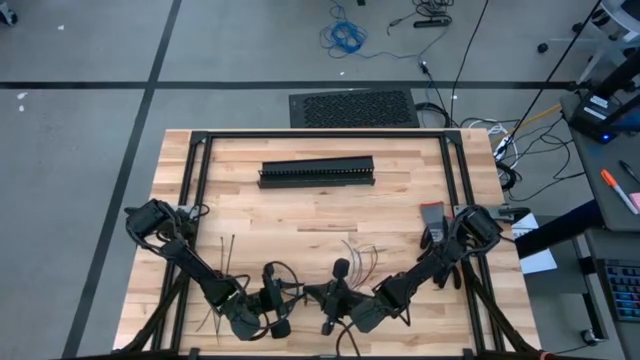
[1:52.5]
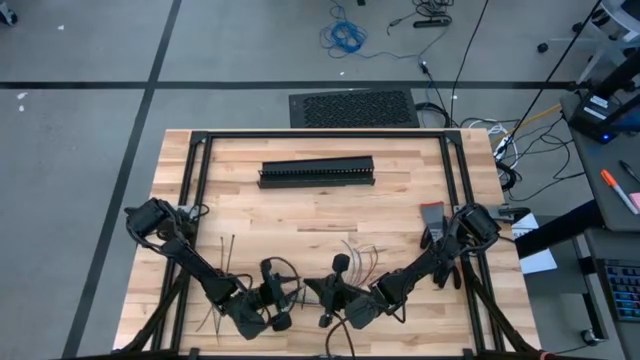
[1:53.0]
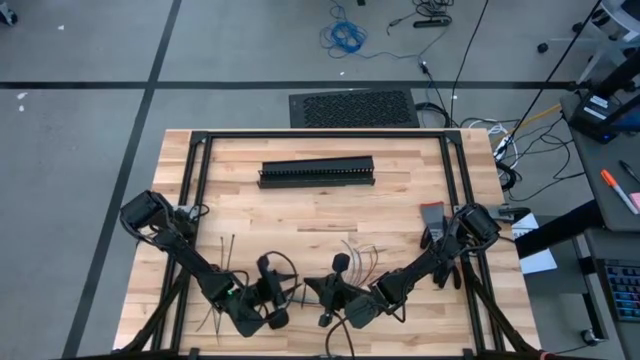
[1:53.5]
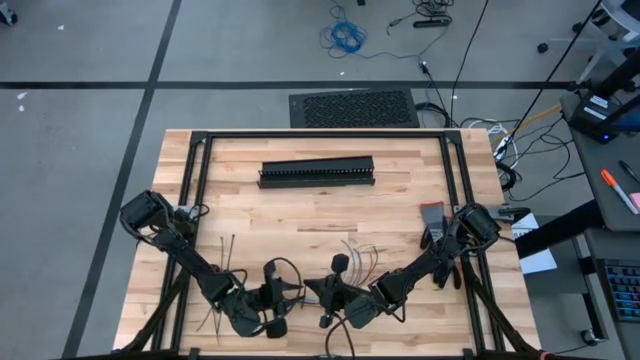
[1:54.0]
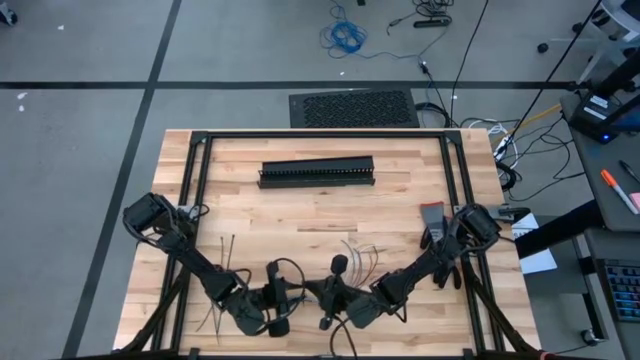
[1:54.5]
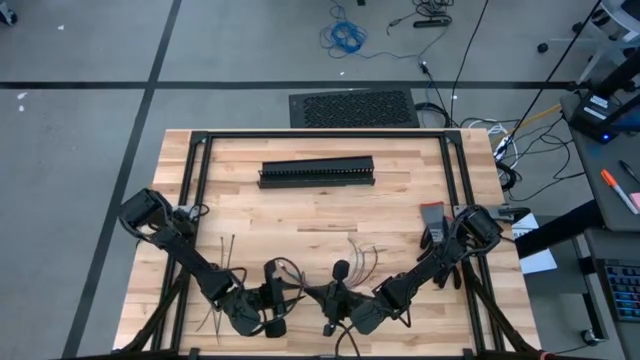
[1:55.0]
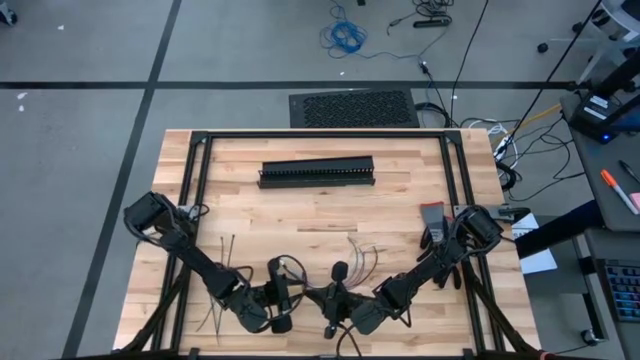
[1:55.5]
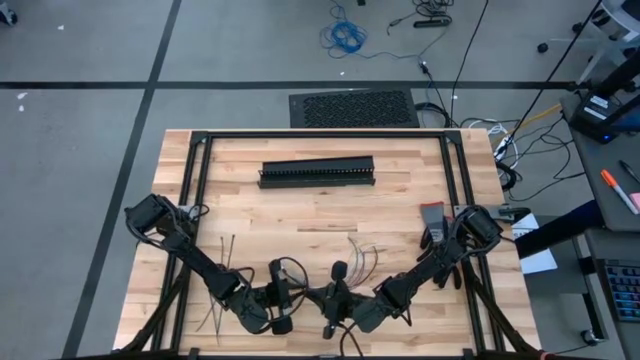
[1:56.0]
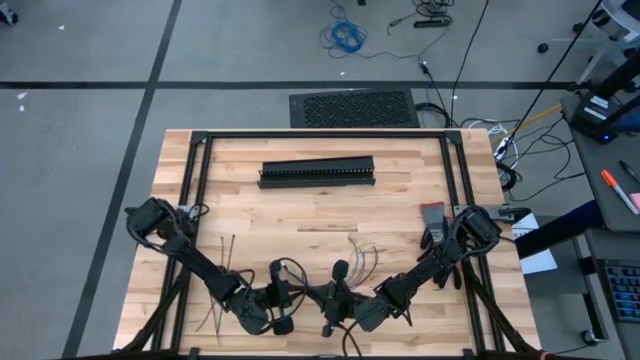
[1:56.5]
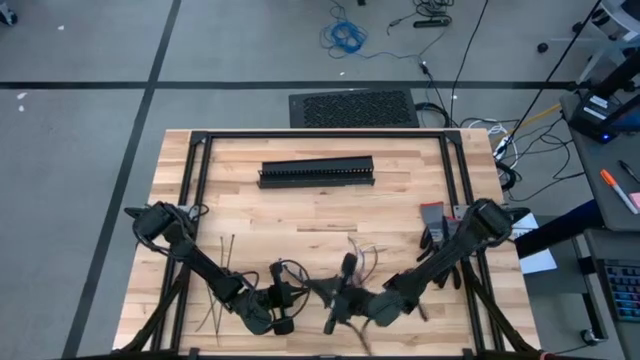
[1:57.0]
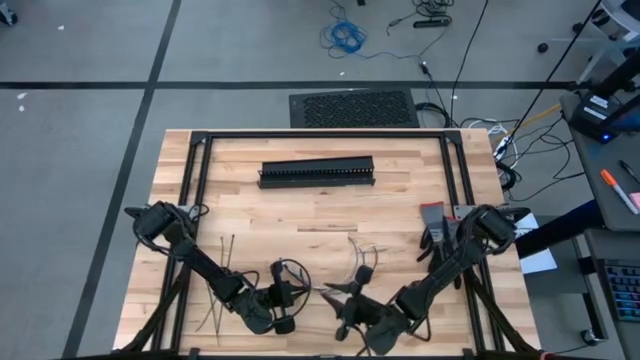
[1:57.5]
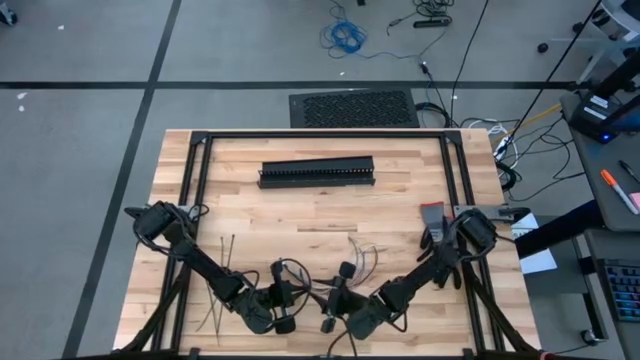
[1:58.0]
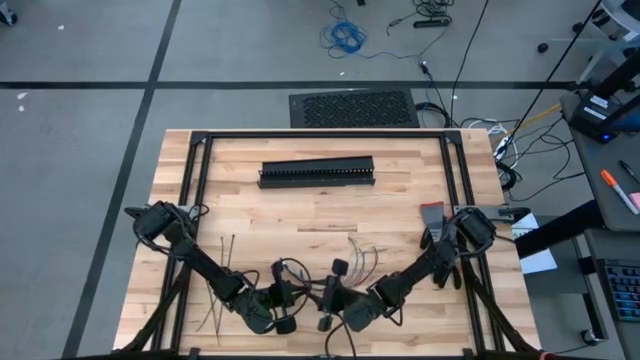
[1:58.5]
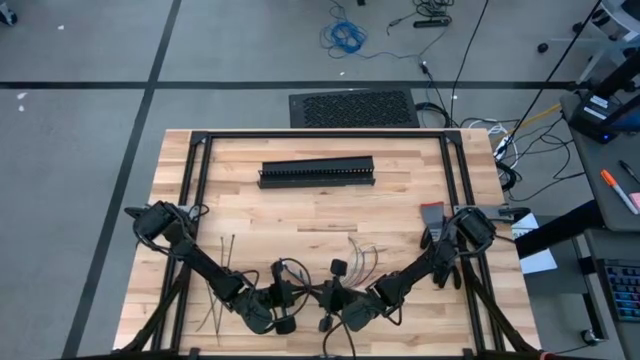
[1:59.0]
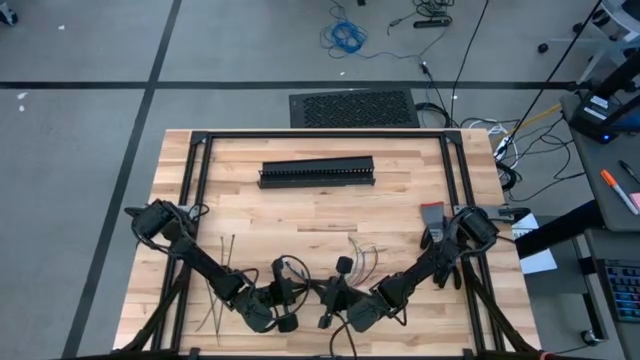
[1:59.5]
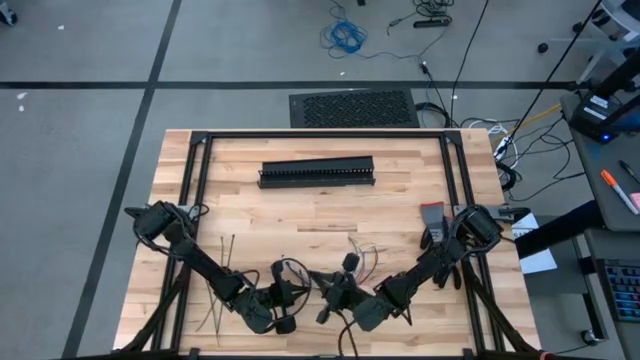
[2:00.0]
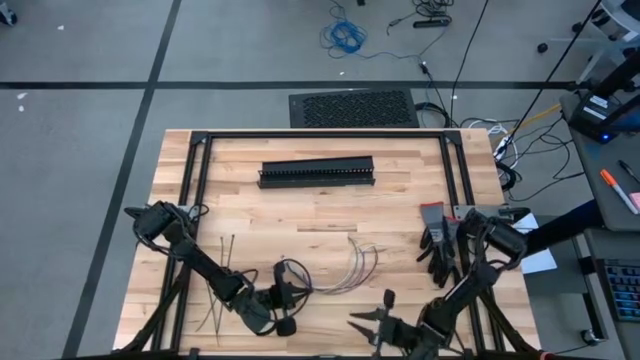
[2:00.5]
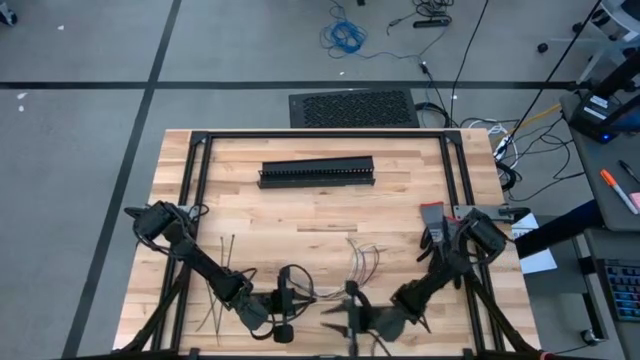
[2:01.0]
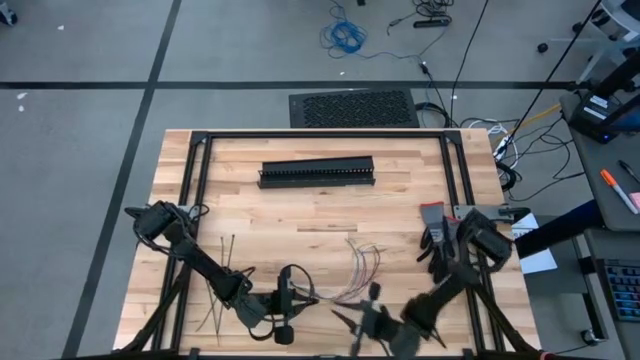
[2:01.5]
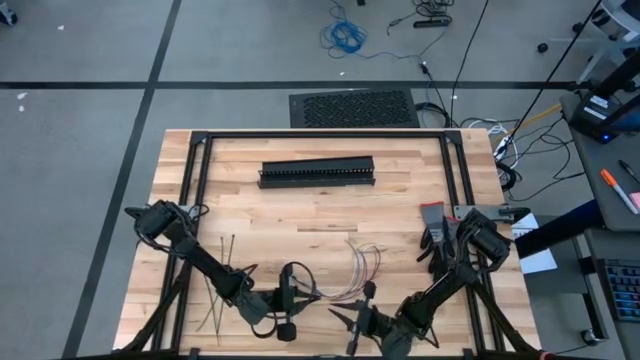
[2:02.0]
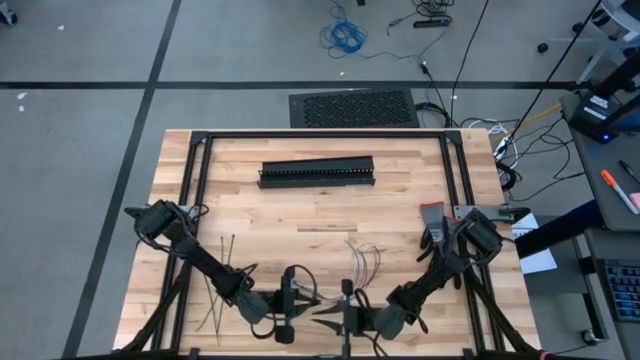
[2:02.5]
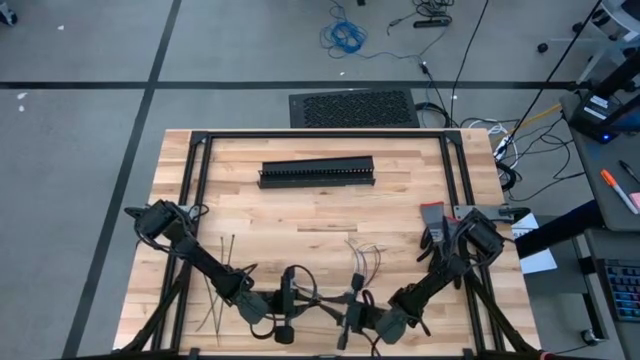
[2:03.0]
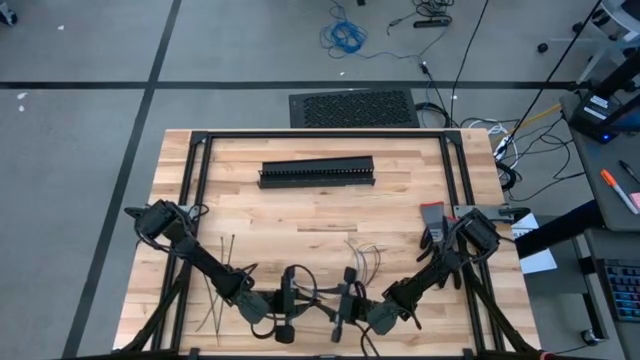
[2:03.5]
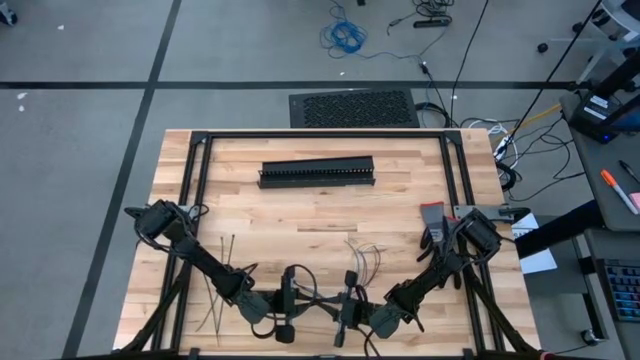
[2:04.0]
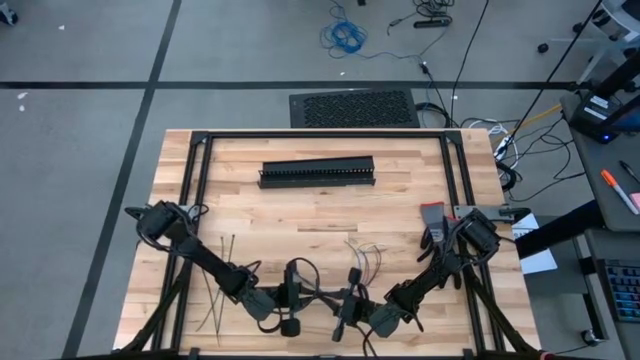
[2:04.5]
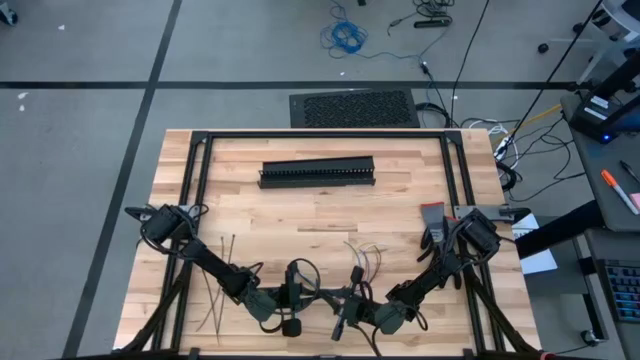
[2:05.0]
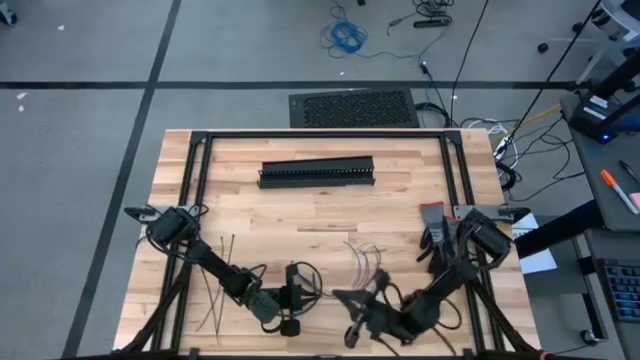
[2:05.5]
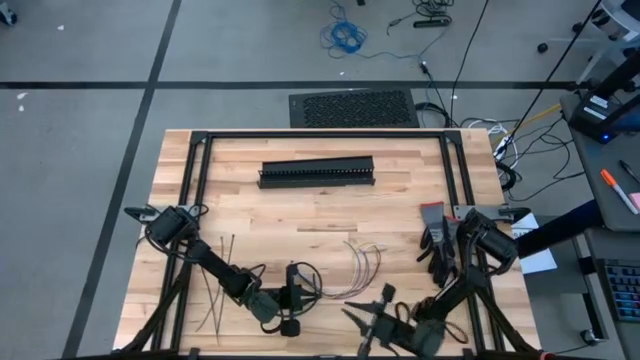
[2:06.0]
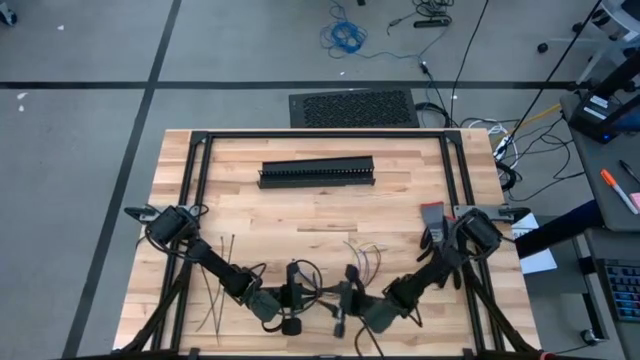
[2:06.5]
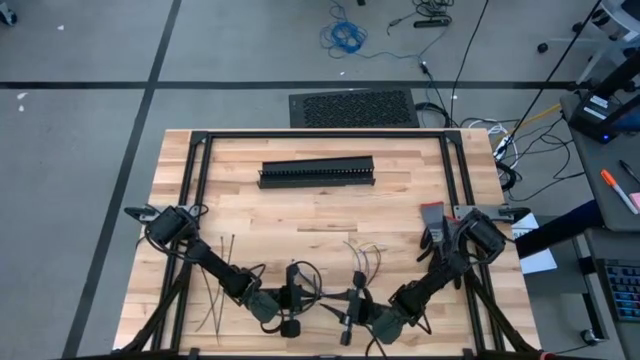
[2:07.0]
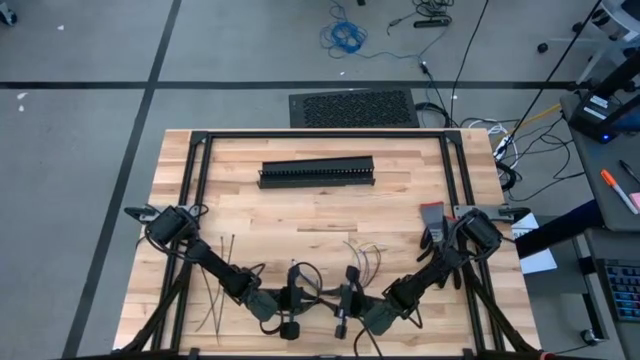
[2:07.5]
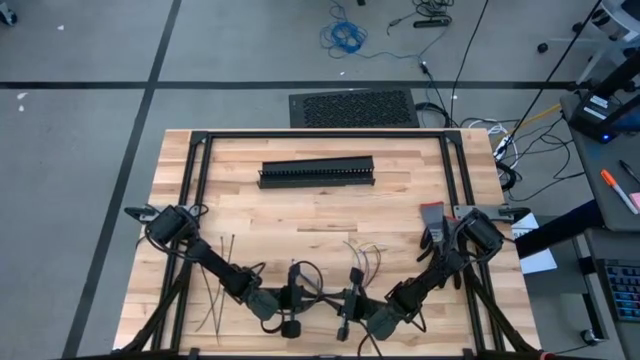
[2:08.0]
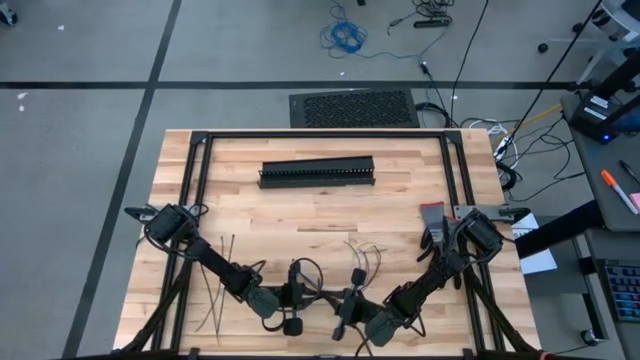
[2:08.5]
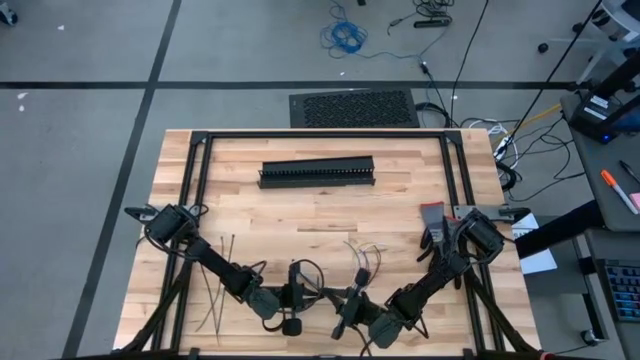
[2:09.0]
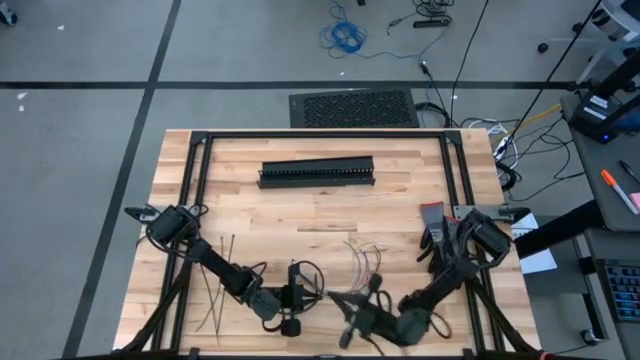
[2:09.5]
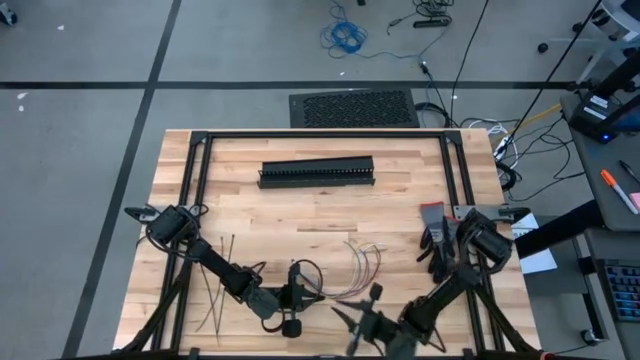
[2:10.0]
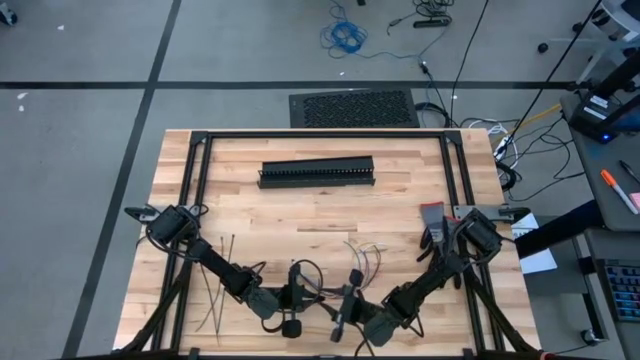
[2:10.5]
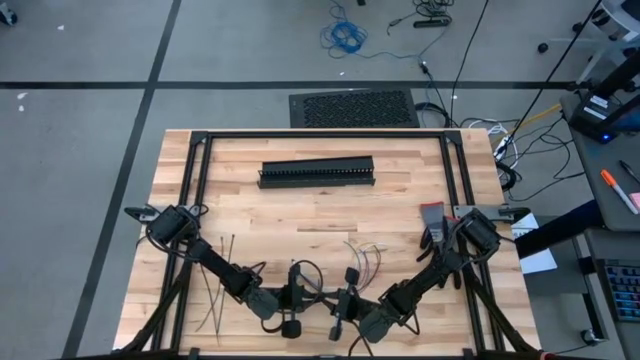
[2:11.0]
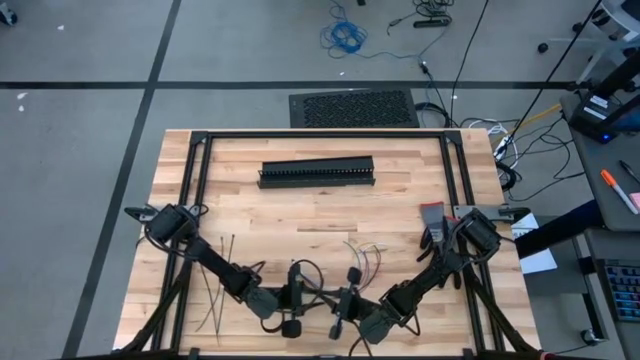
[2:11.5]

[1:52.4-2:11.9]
Task: Ziptie cables
Wrap the zip tie around the cable wires

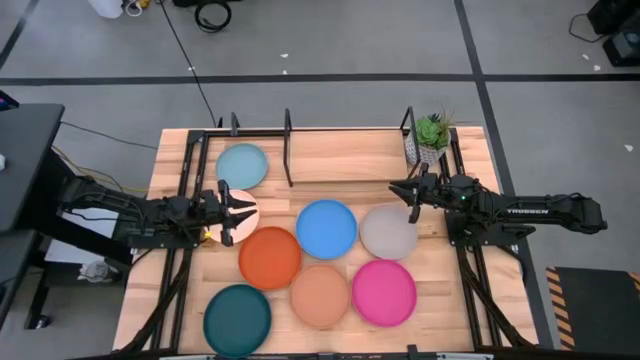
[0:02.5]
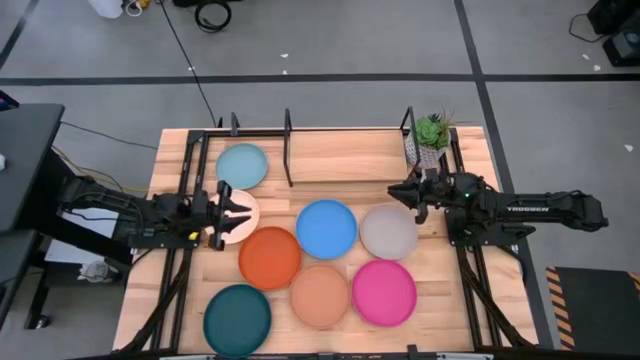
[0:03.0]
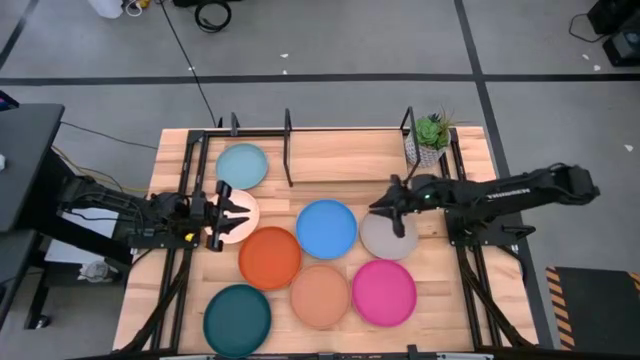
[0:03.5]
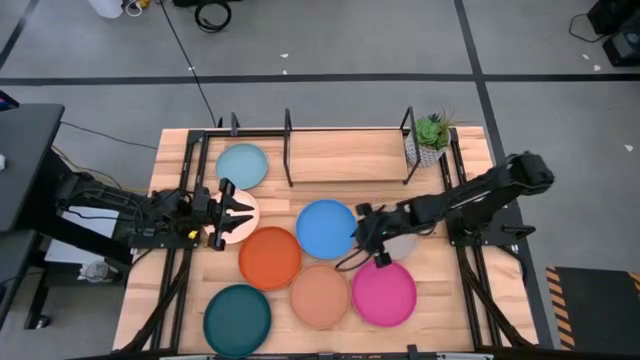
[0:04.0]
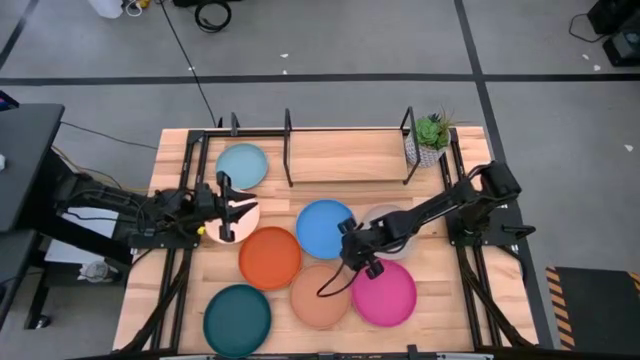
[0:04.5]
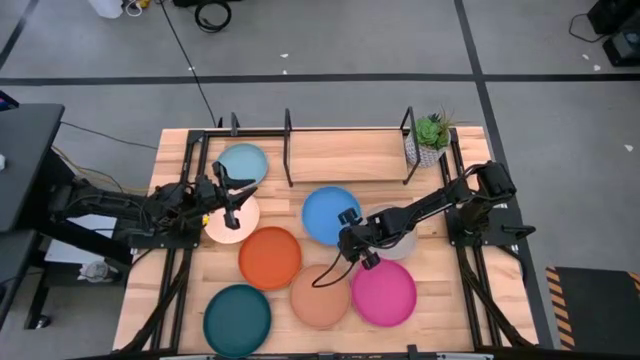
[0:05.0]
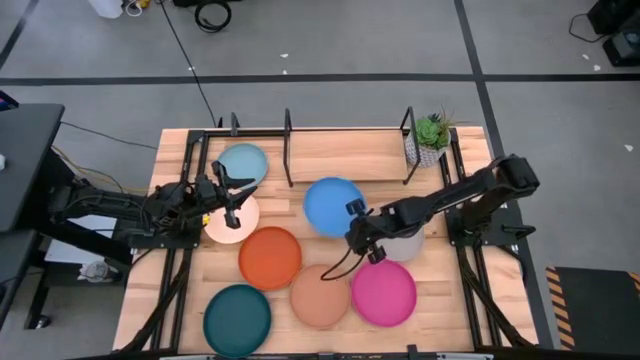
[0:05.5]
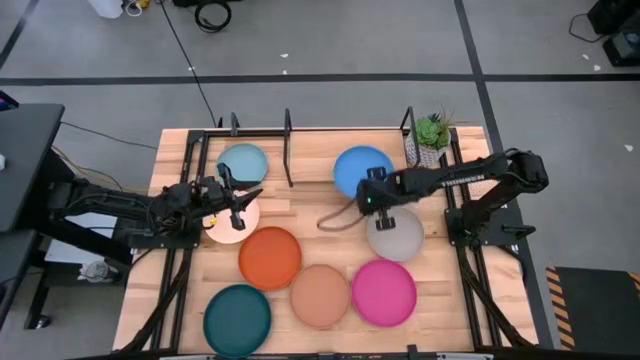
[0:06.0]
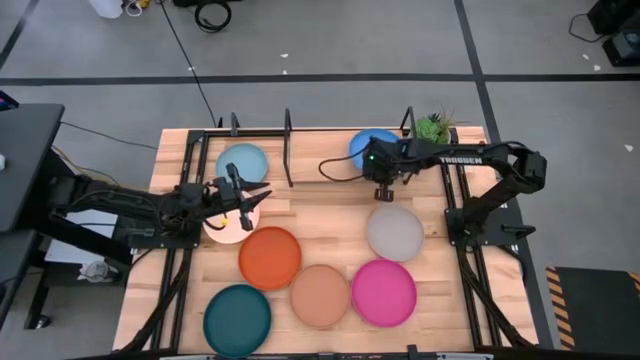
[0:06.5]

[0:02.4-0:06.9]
Task: Place and stack plates onto a shelf
Put the blue plate on the shelf
